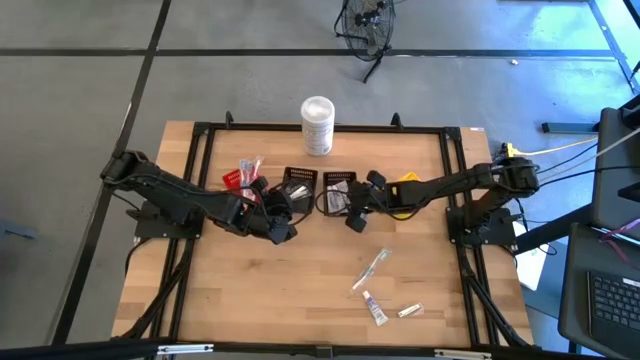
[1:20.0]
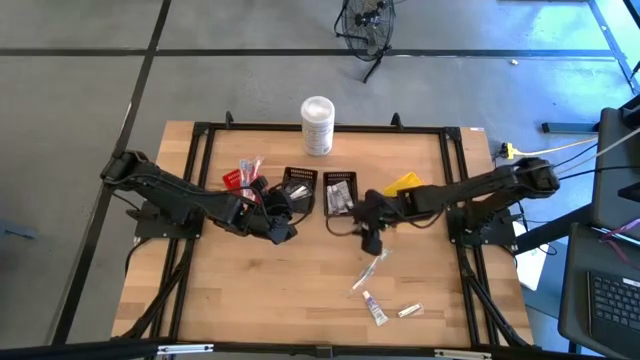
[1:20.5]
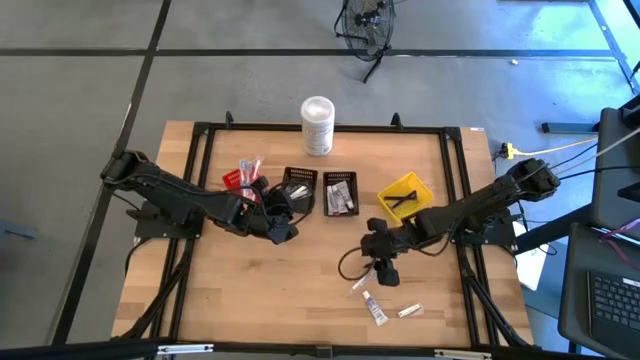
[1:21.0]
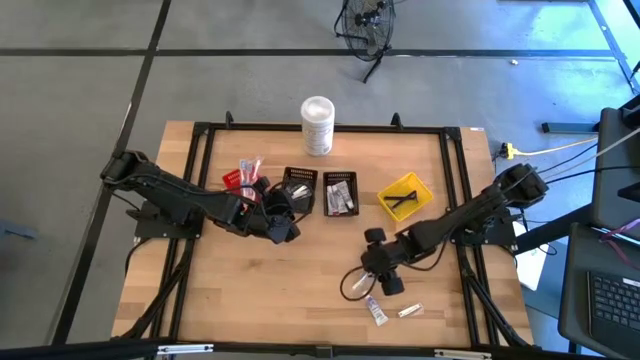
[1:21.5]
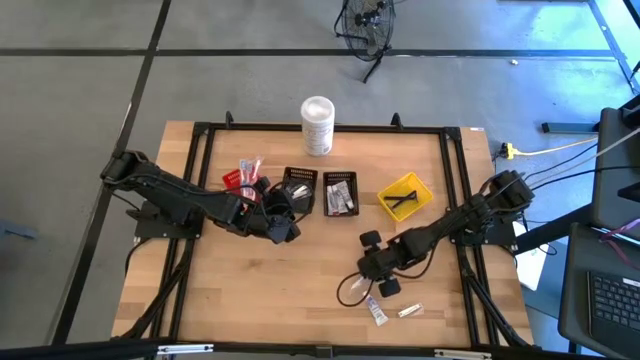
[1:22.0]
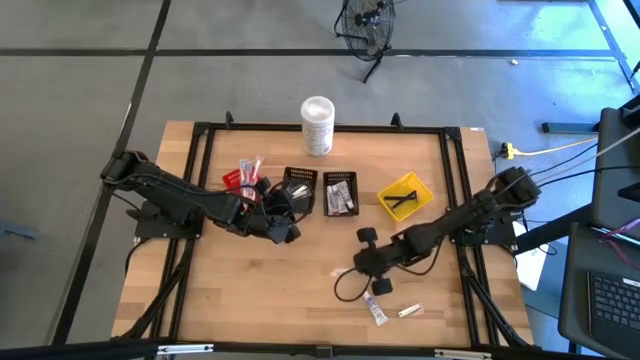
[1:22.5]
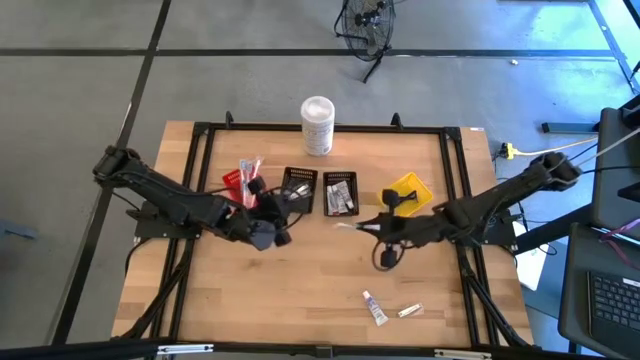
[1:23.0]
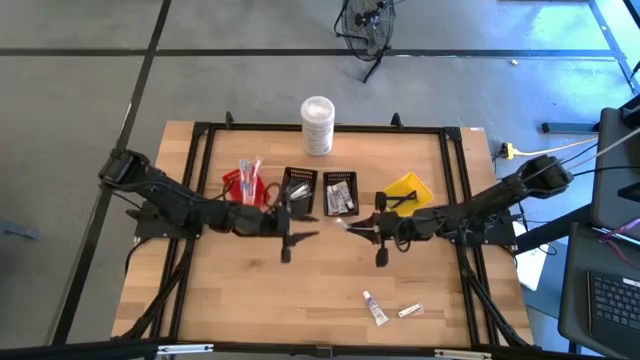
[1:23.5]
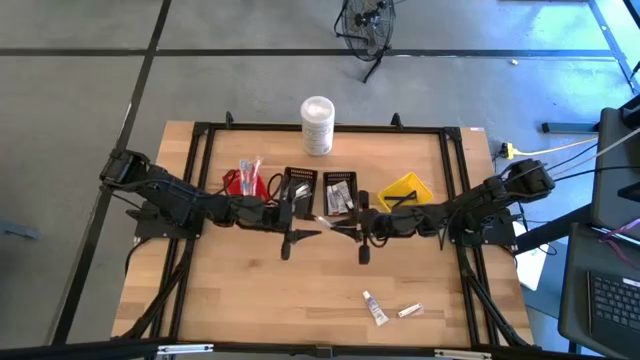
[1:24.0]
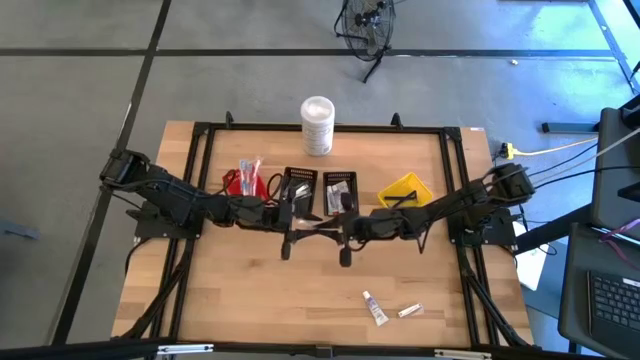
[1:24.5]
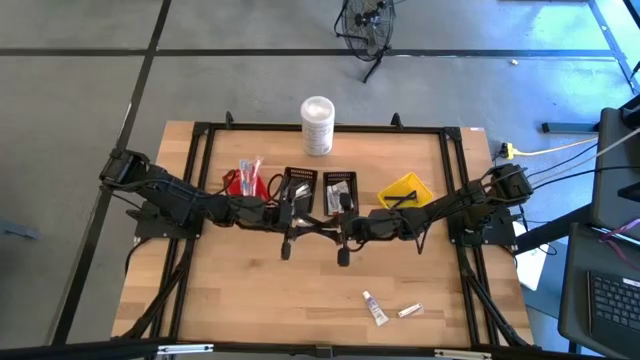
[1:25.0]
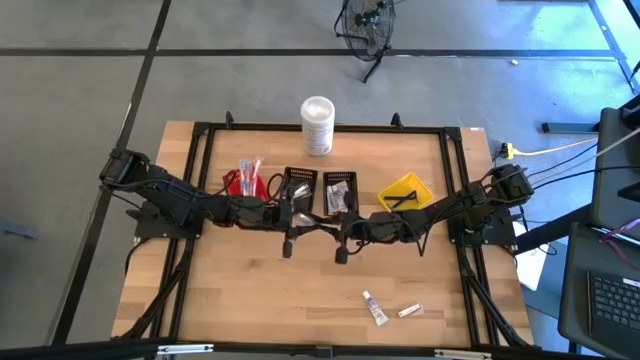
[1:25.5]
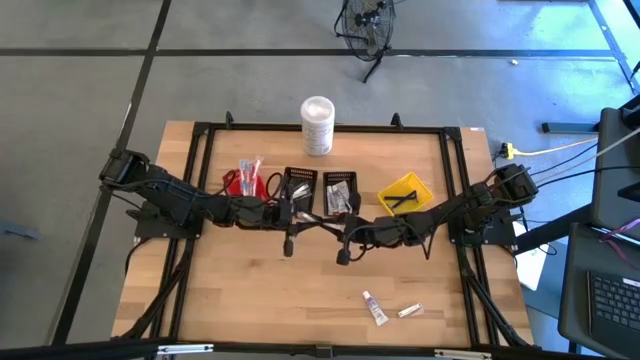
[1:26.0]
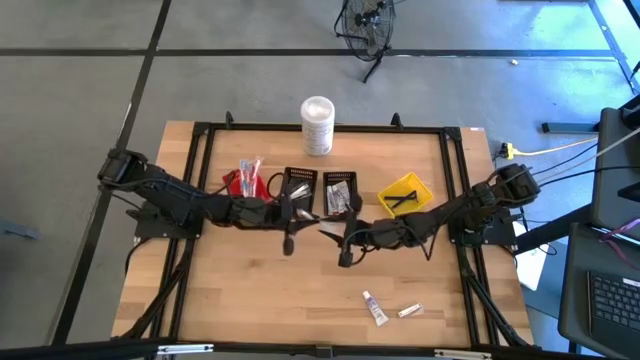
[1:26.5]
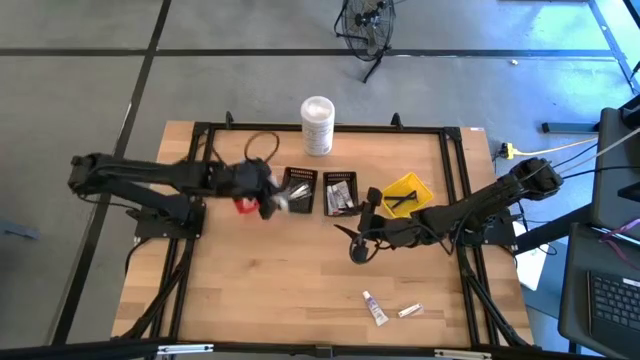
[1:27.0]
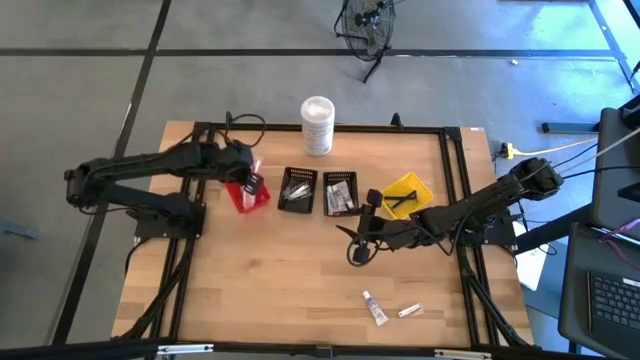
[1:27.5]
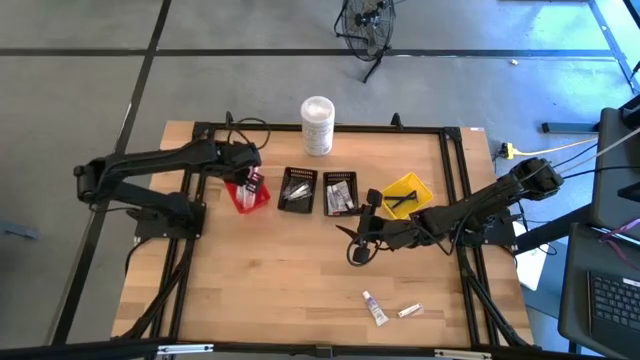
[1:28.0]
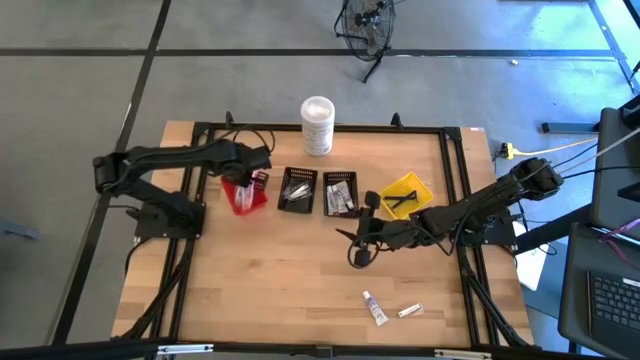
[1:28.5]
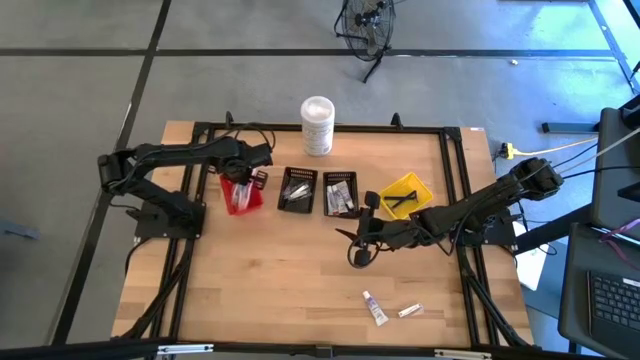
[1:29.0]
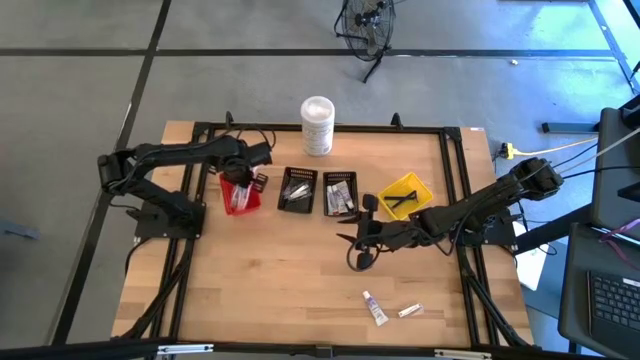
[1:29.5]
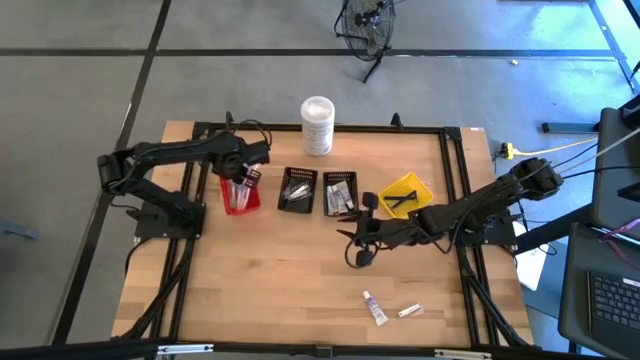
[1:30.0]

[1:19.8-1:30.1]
Task: Pick & Place Travel size toiletries
Put the green toothbrush into the red bin

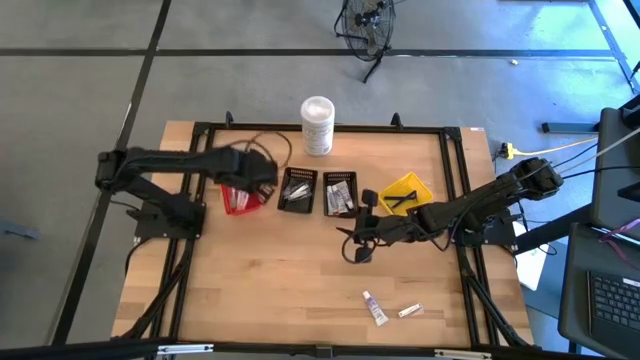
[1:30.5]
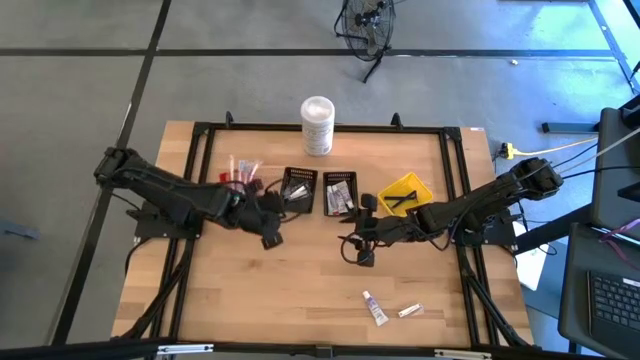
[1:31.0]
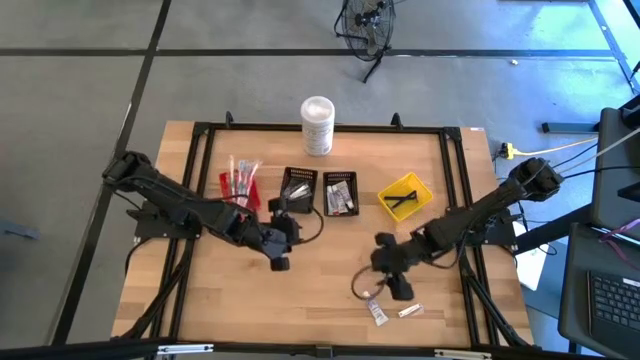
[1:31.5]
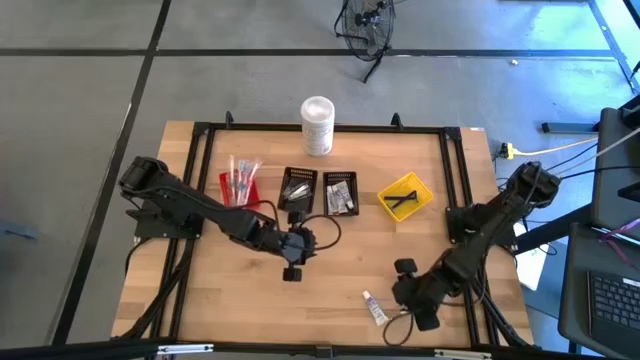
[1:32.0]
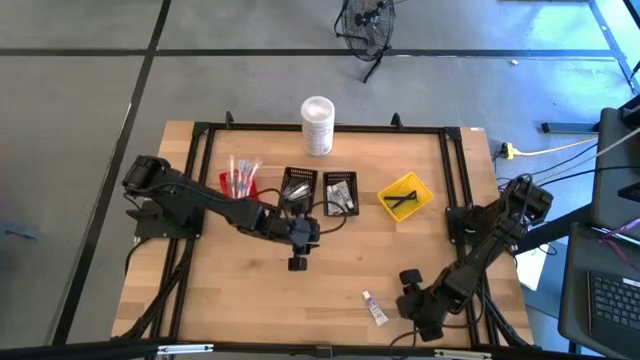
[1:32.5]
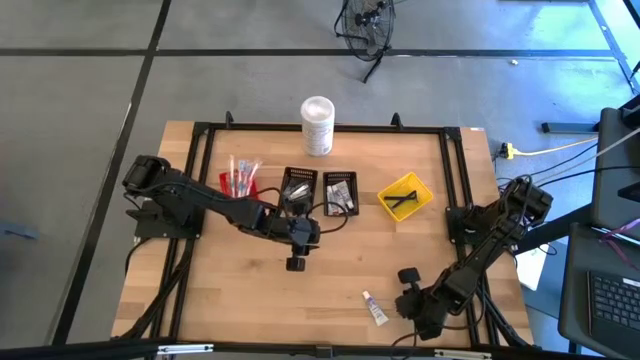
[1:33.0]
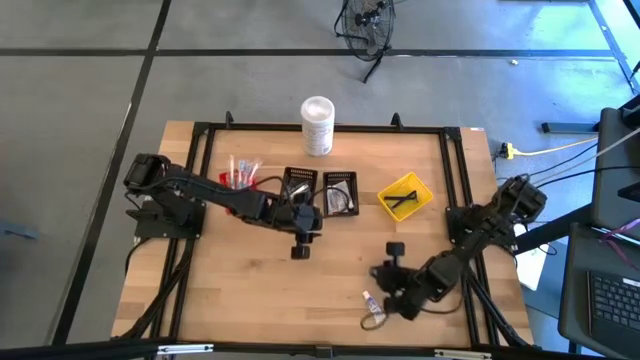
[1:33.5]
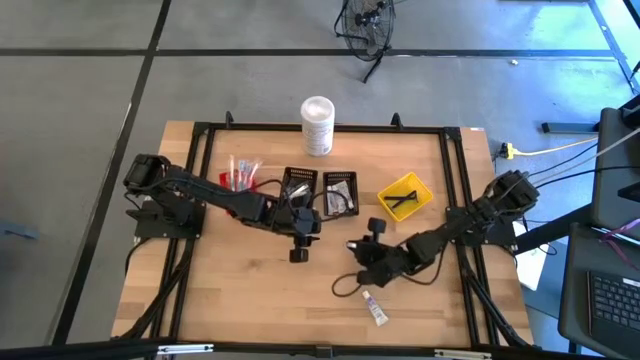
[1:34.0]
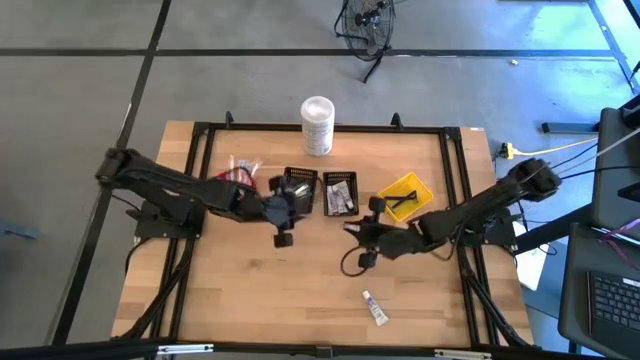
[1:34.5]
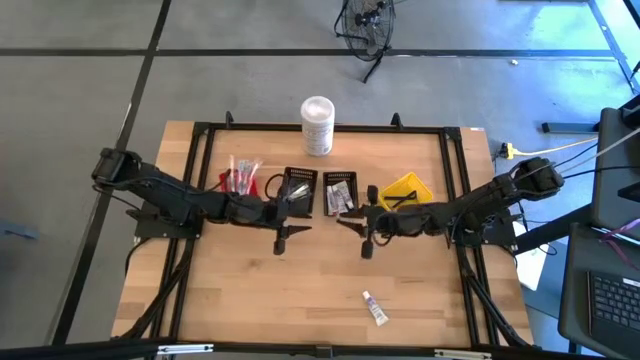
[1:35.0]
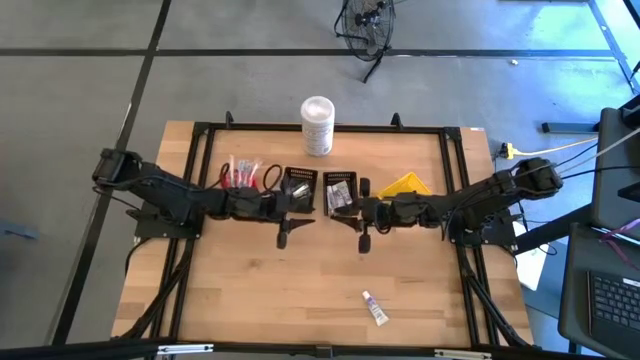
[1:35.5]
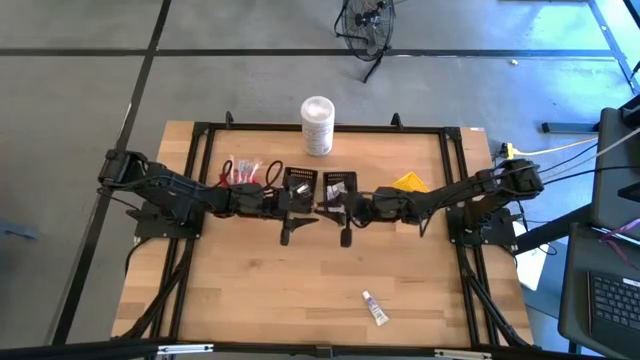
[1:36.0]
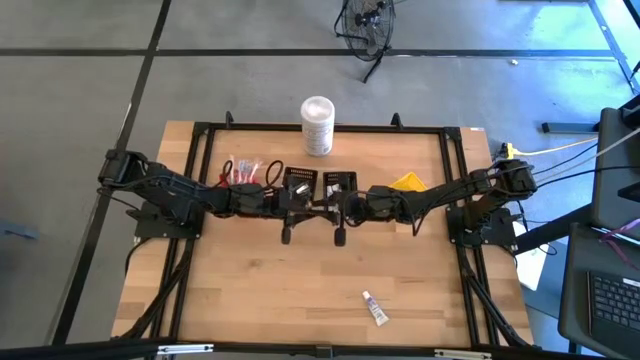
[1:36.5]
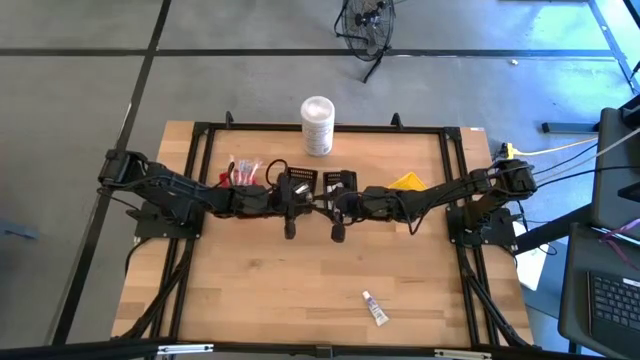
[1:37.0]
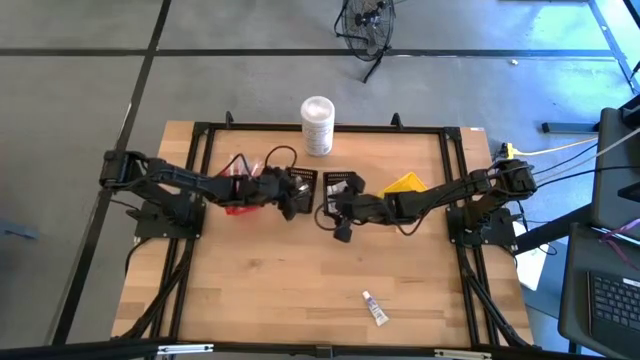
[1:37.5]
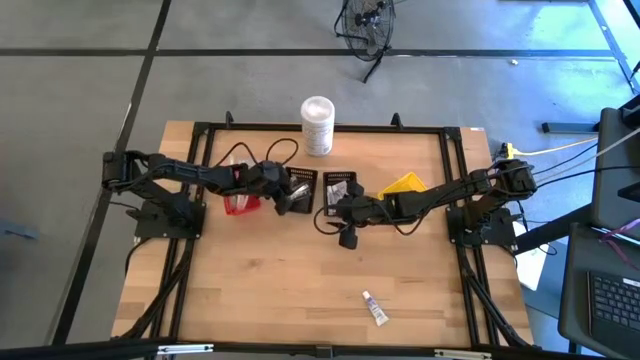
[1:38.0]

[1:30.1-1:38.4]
Put the silver nail cutter into the left black bin

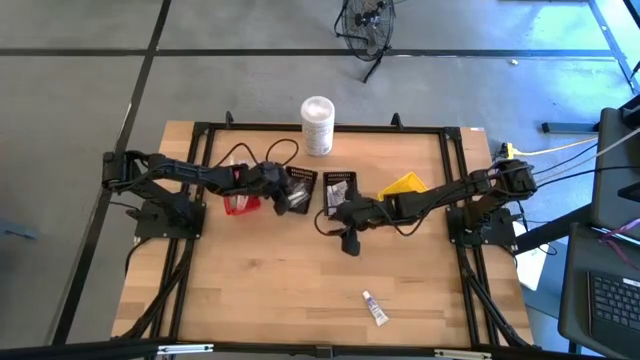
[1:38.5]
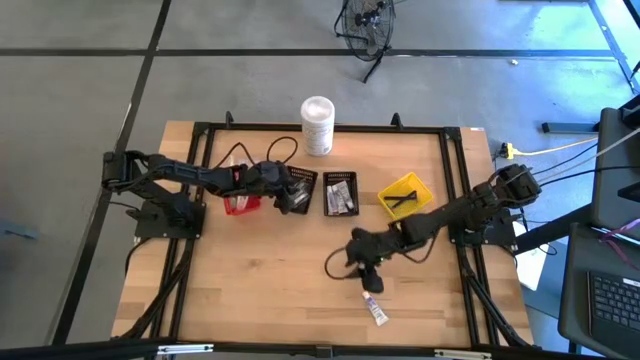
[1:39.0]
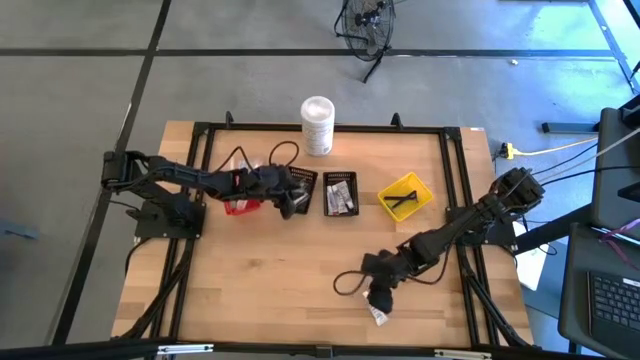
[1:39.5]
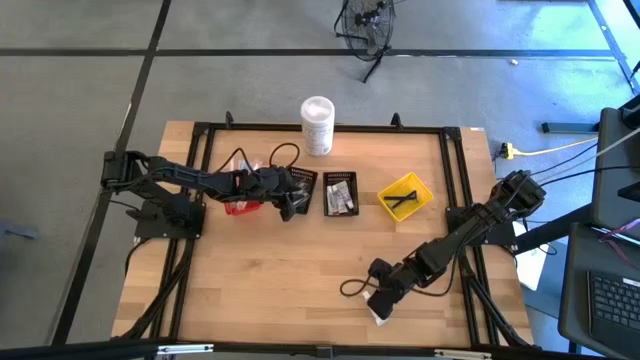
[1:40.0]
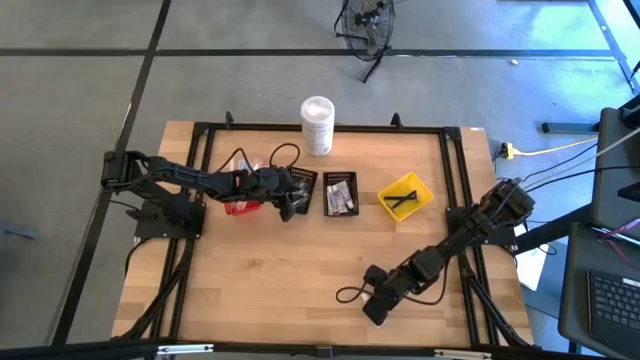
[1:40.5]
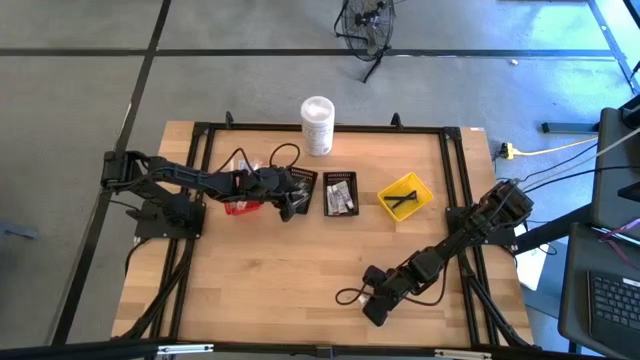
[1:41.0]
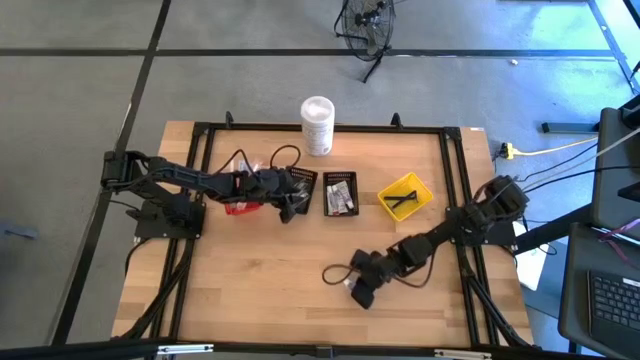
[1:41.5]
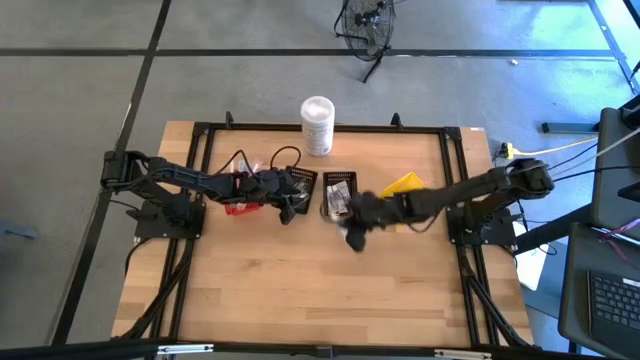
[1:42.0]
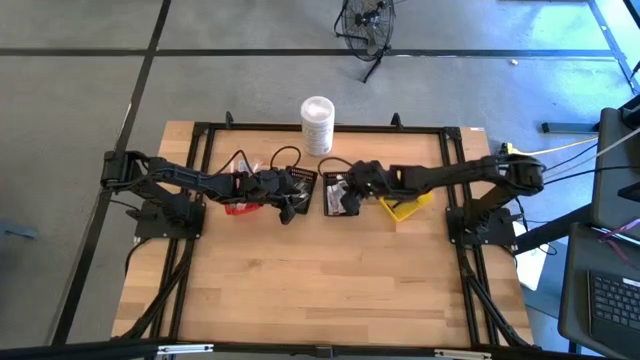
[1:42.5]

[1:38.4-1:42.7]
Put the white toothpaste into the right black bin
